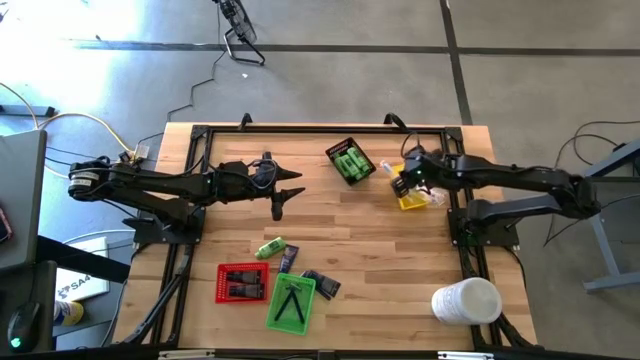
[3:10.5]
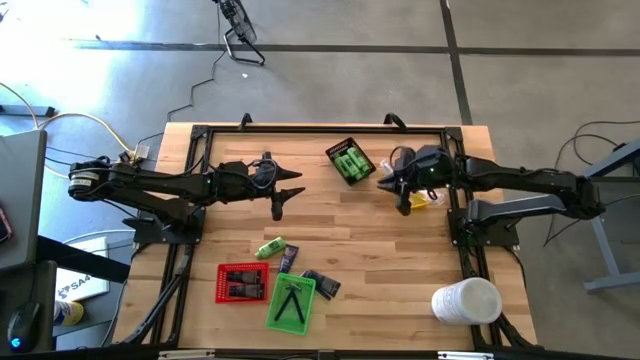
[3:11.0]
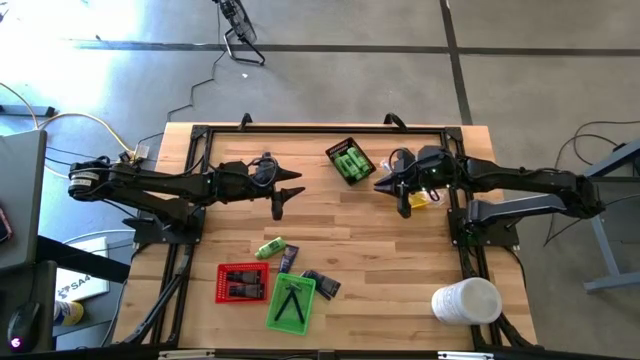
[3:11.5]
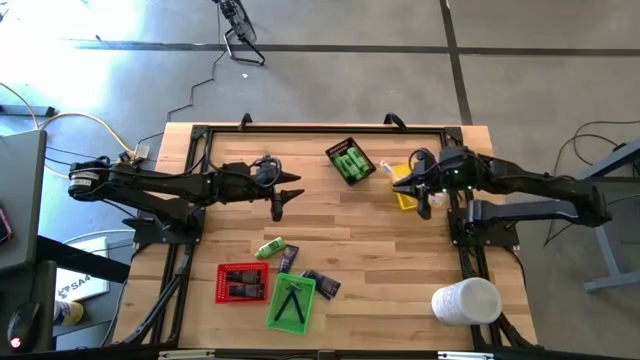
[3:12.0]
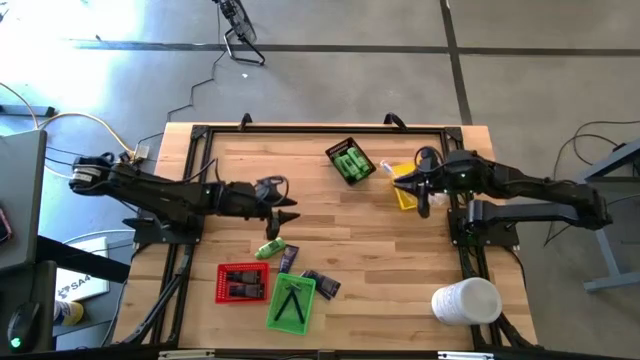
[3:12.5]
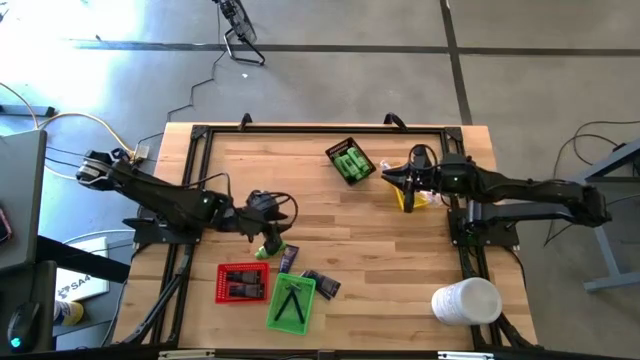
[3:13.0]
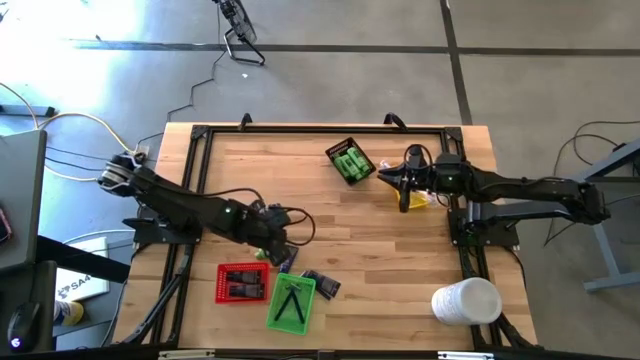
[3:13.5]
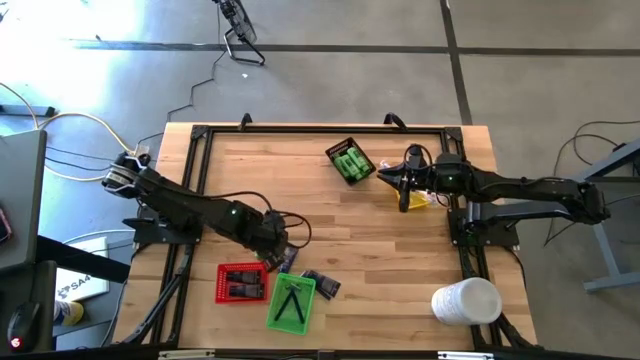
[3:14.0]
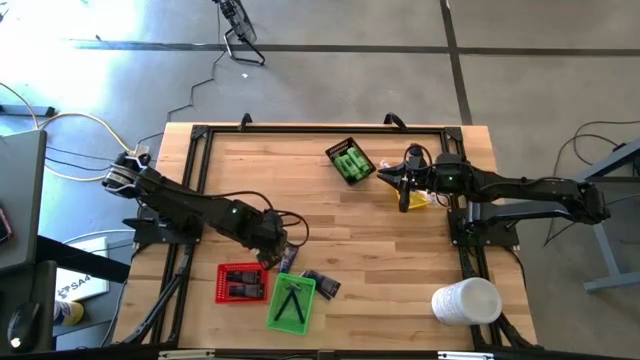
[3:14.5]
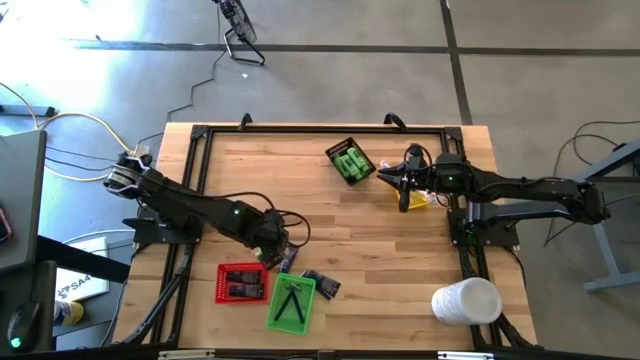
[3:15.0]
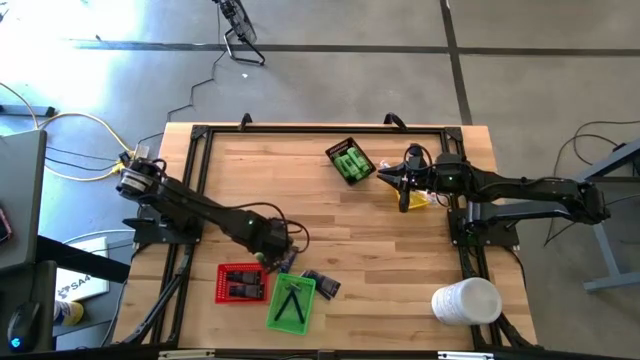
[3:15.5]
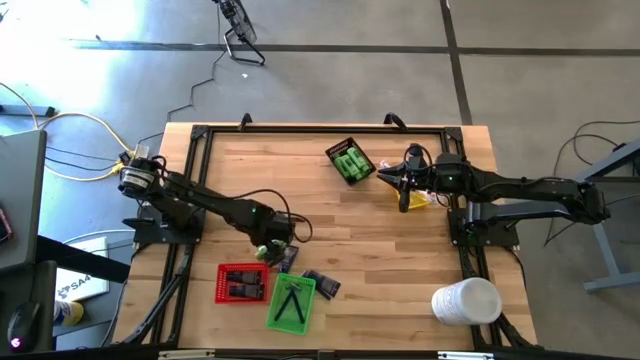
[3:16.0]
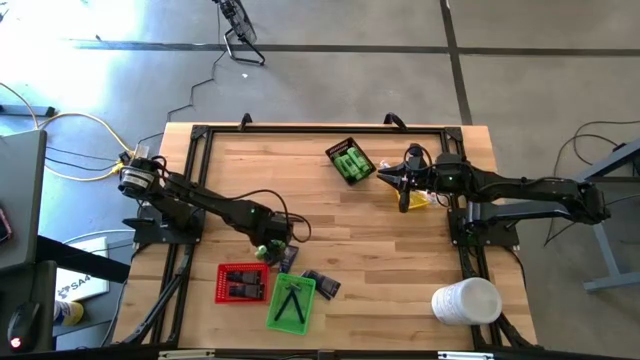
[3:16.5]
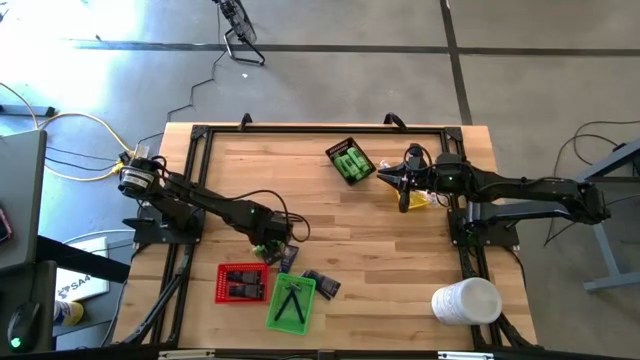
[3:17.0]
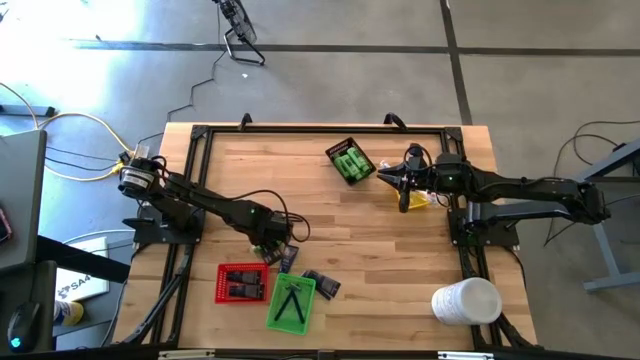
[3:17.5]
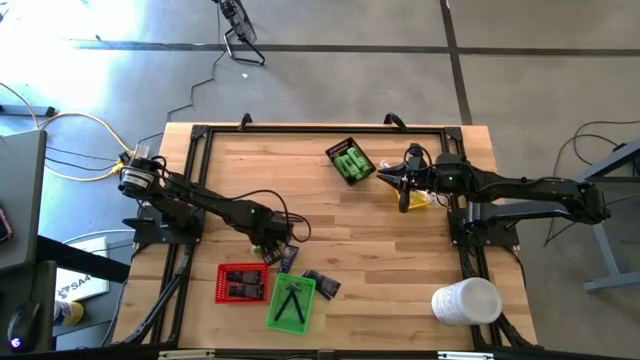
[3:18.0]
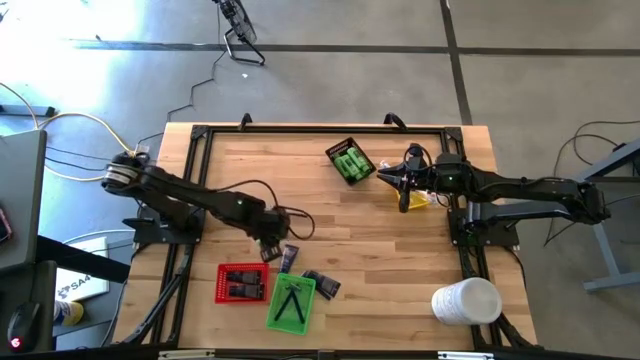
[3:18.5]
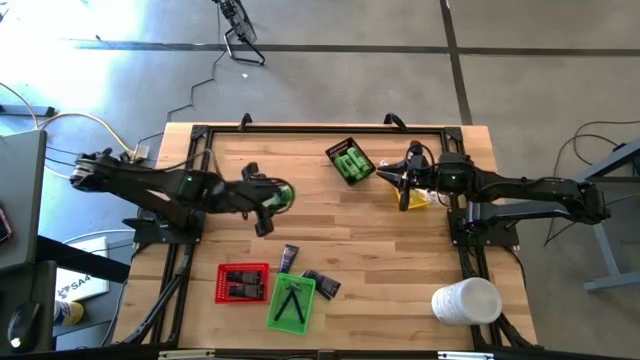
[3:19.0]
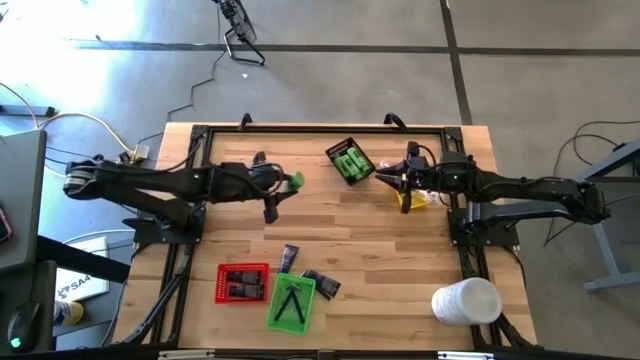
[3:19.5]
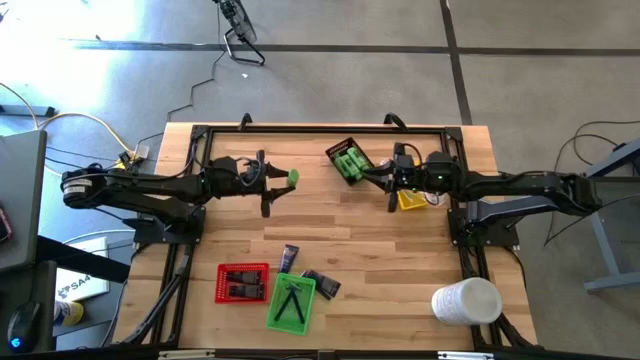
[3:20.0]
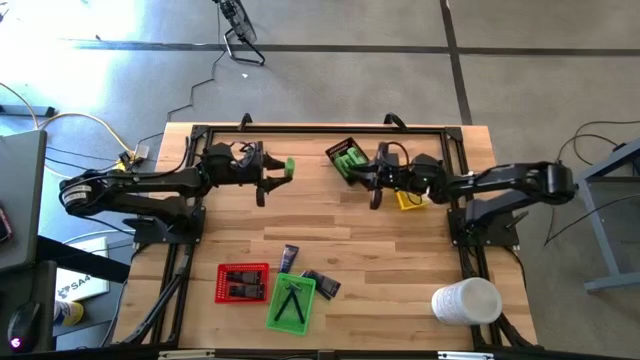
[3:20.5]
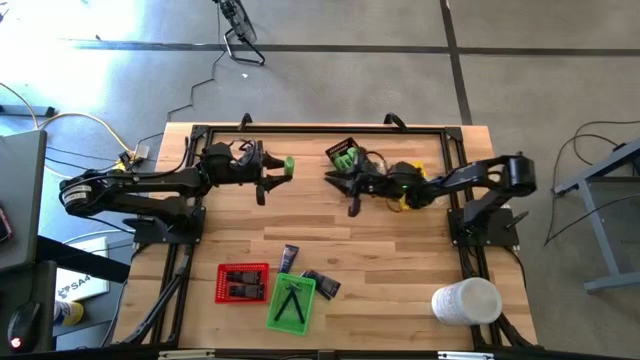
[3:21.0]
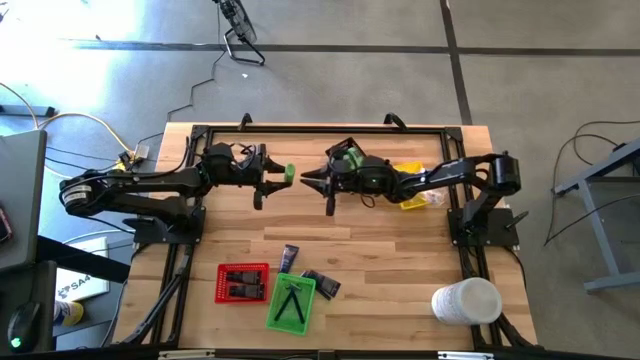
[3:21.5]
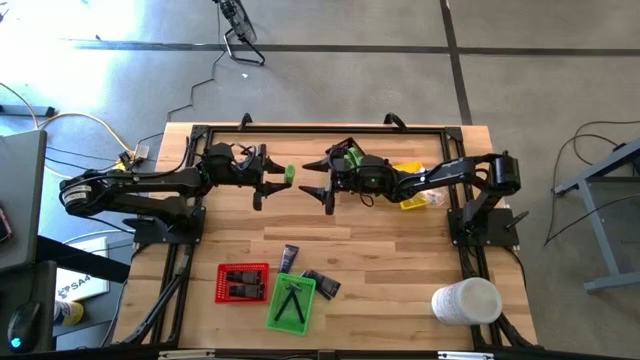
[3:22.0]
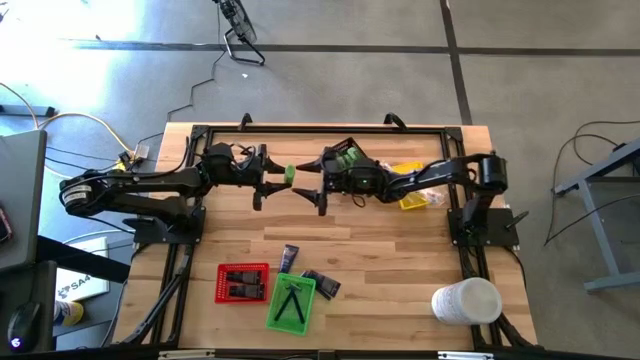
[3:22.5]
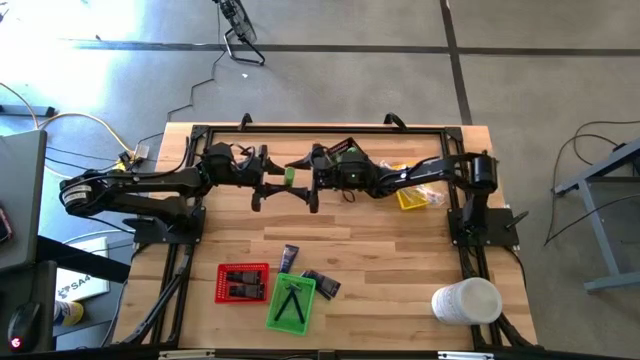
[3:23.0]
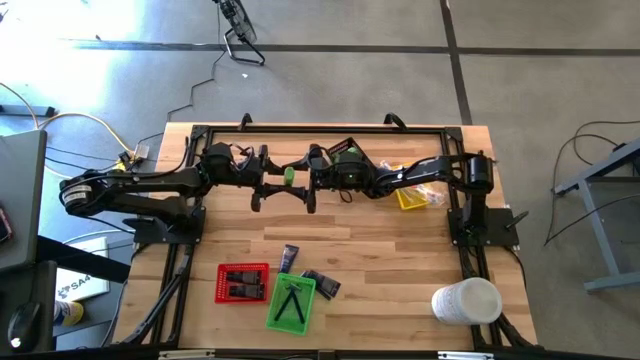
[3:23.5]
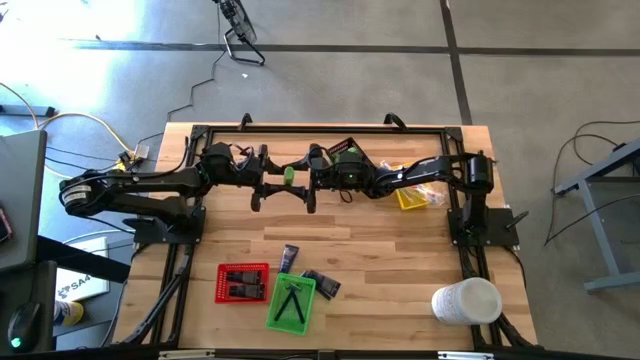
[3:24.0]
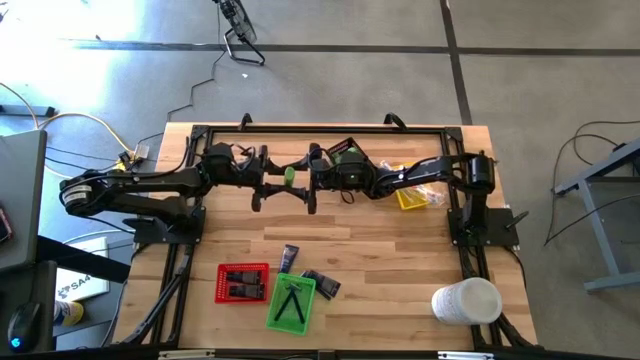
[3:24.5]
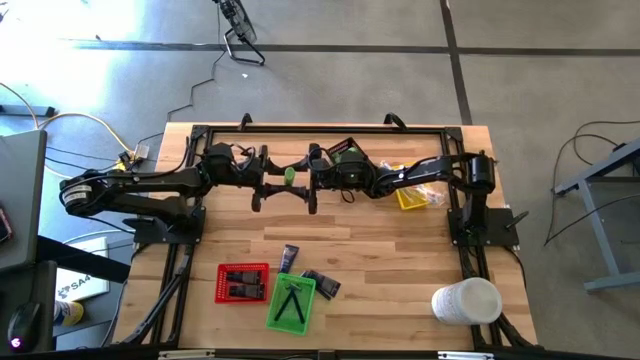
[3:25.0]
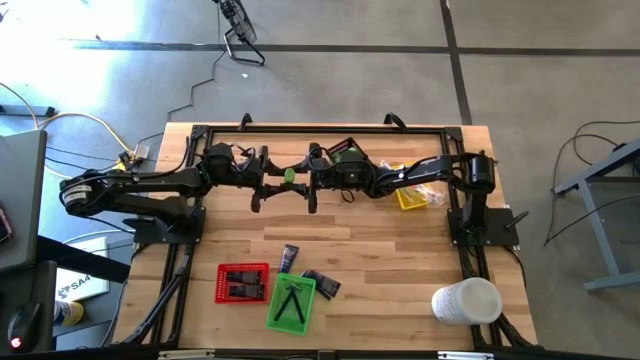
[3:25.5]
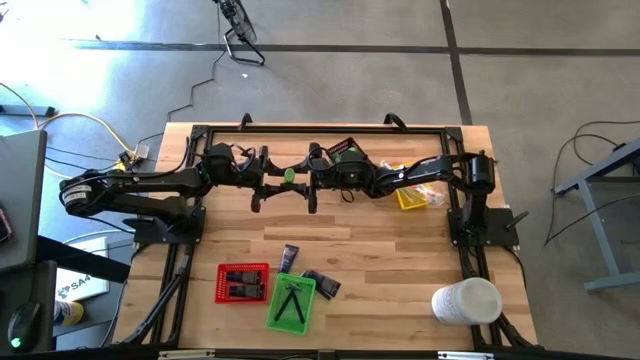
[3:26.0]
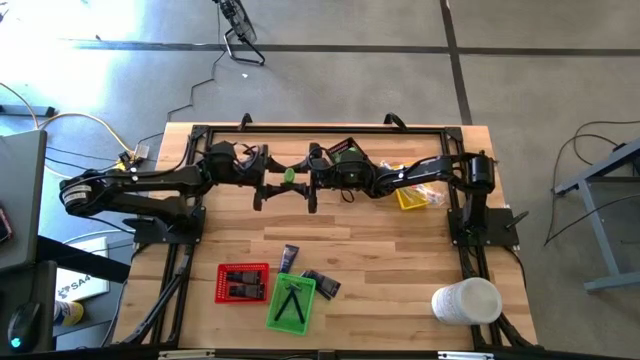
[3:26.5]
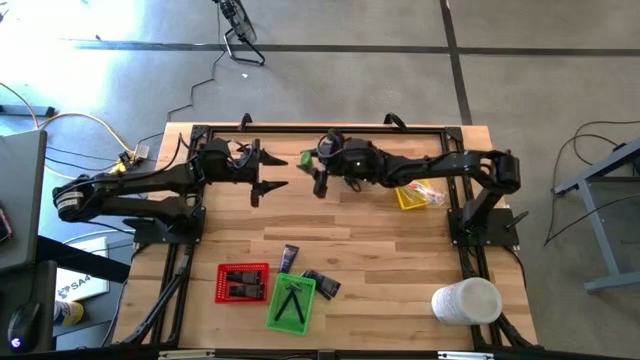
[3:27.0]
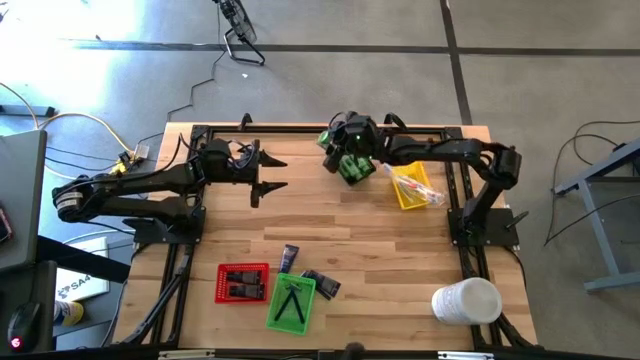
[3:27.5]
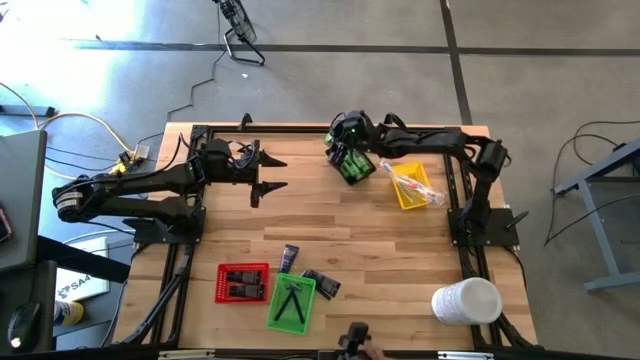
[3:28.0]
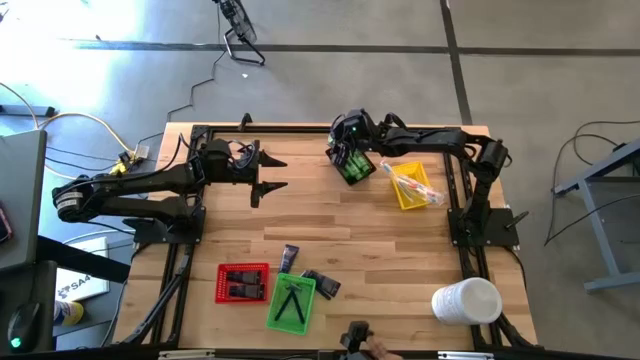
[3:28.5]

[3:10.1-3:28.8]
Task: Pick & Place Travel size toiletries
Put the shampoo into the black bin

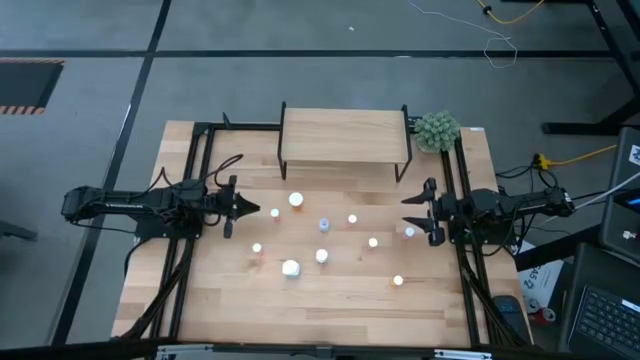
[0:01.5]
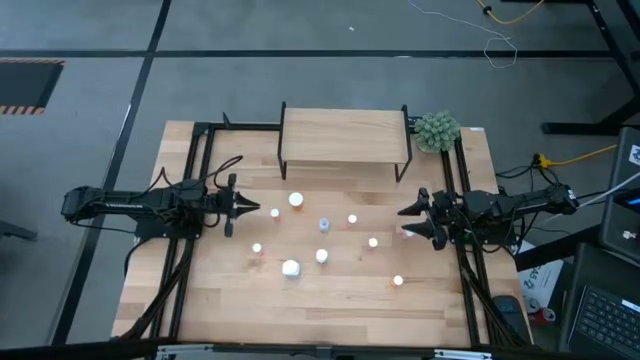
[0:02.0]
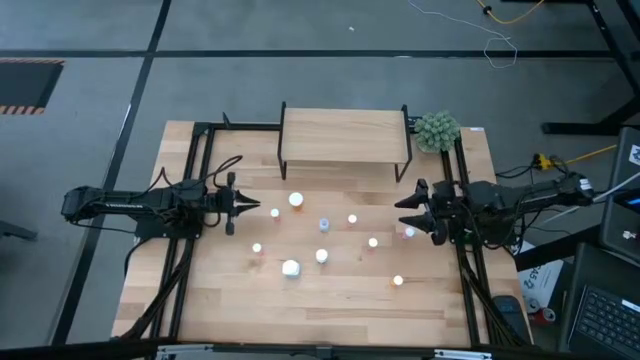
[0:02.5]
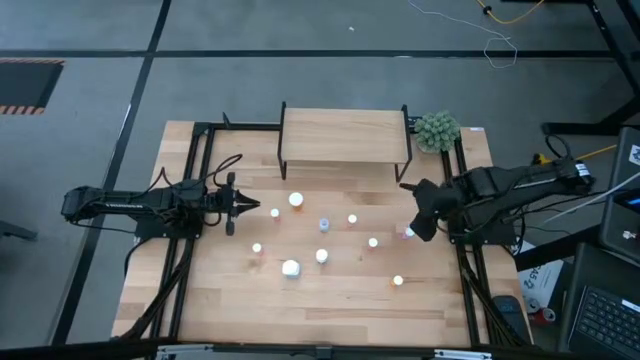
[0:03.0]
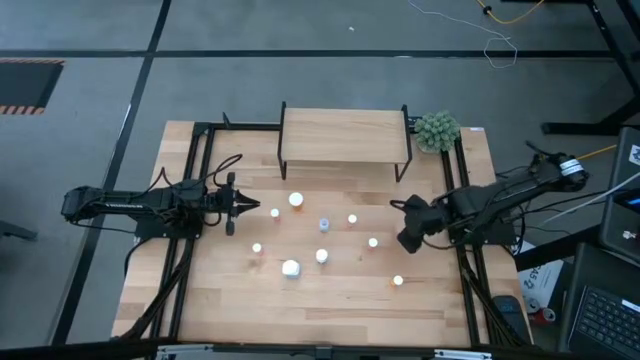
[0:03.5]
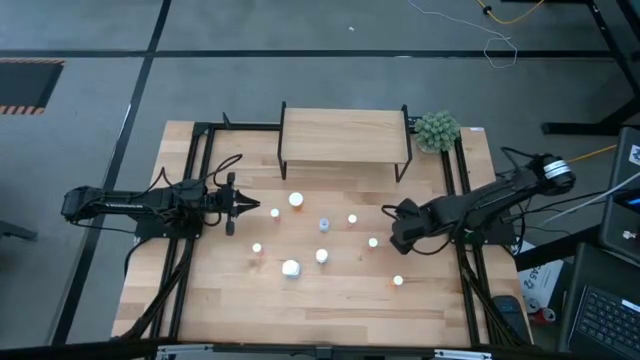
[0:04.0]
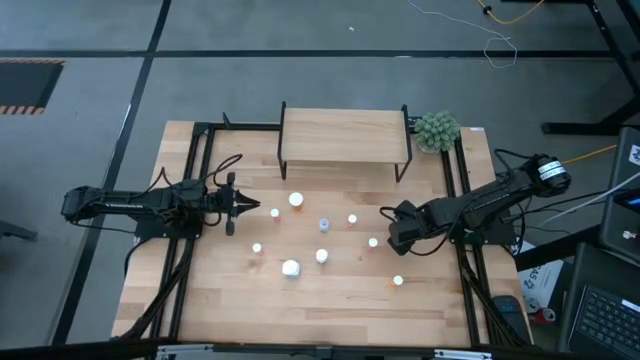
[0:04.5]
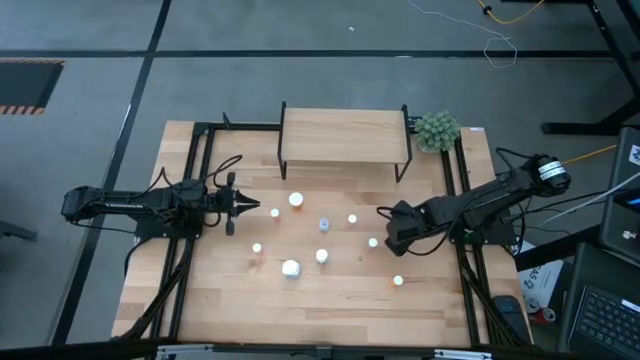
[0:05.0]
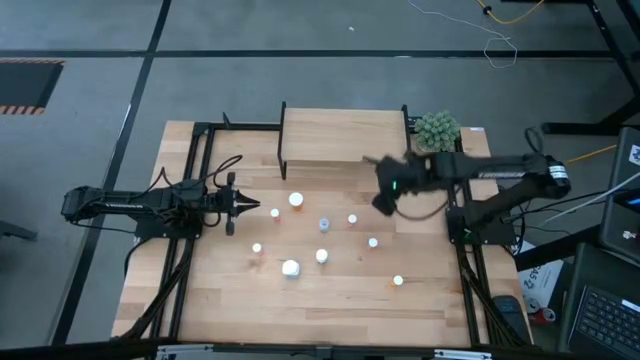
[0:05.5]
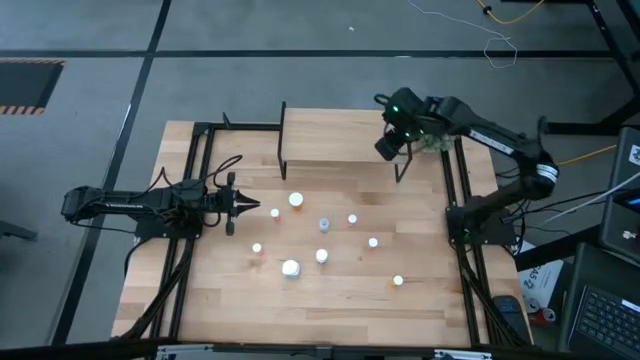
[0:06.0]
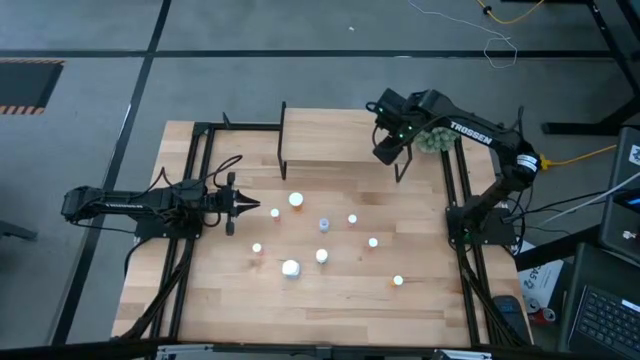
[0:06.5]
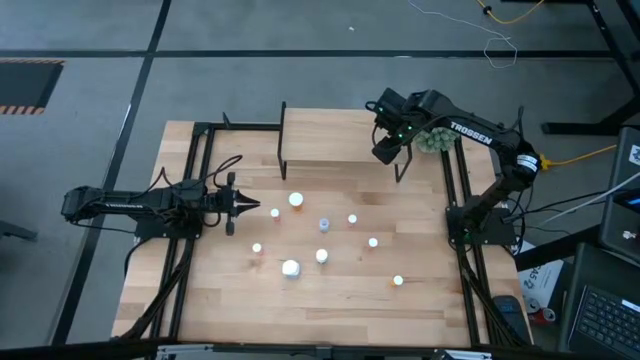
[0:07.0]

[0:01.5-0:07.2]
Task: Pick and place medicine bottles onto shelf by color
Put the pink pill bottle on the shelf
